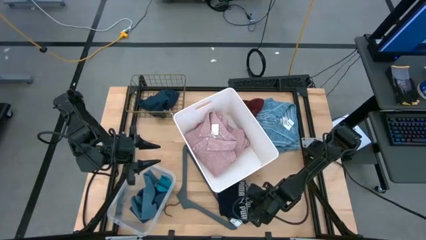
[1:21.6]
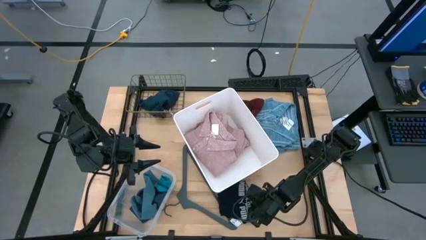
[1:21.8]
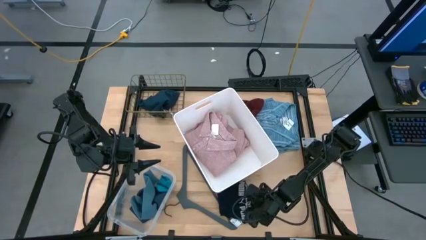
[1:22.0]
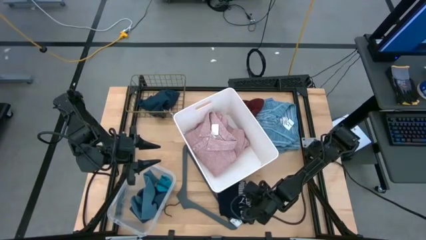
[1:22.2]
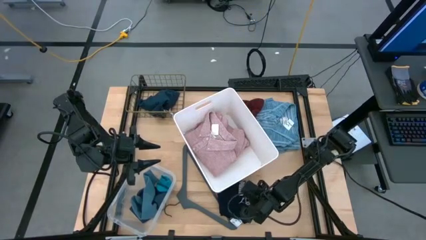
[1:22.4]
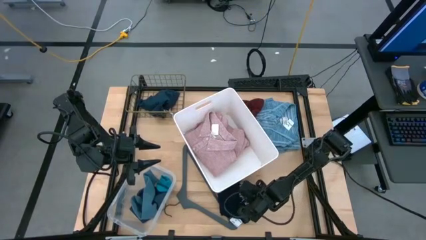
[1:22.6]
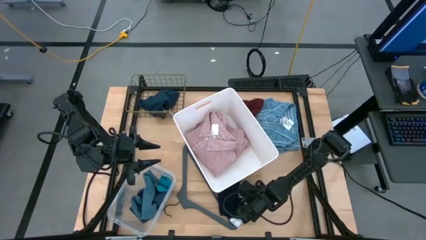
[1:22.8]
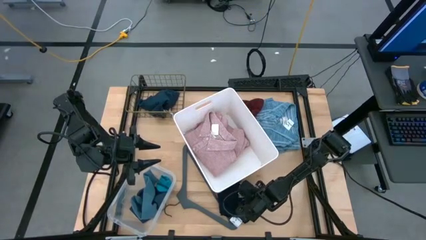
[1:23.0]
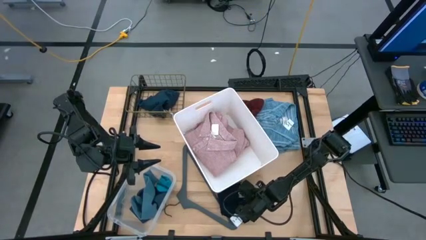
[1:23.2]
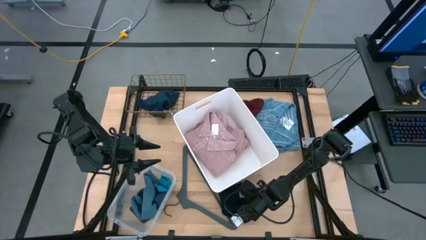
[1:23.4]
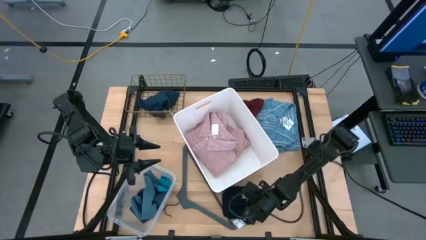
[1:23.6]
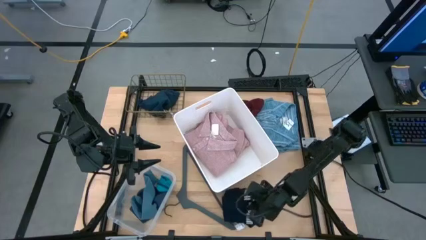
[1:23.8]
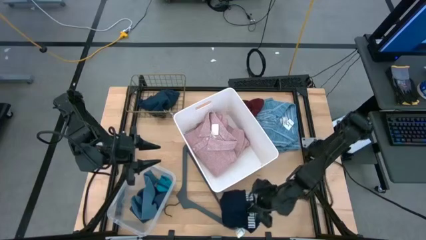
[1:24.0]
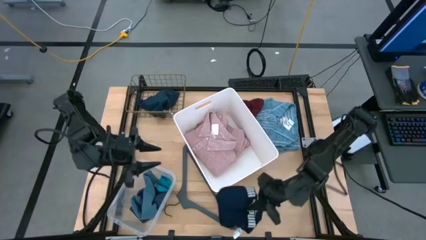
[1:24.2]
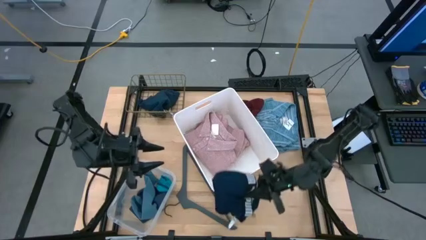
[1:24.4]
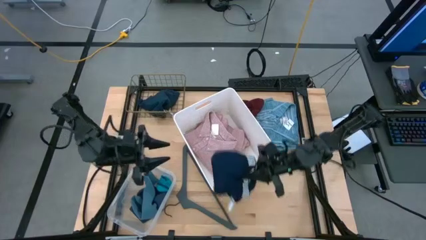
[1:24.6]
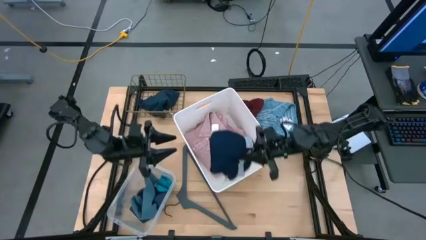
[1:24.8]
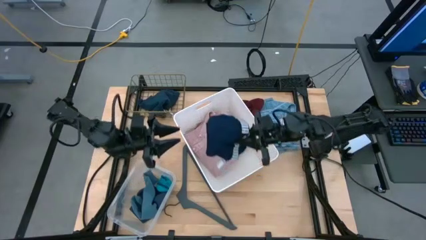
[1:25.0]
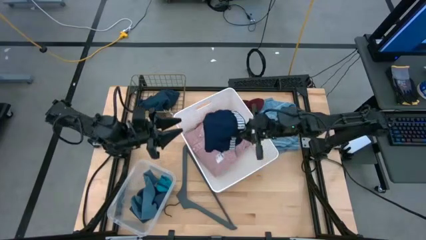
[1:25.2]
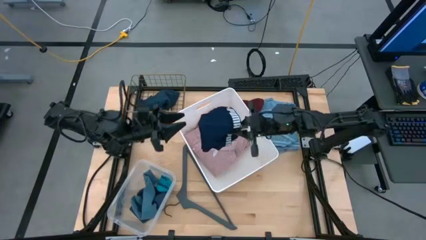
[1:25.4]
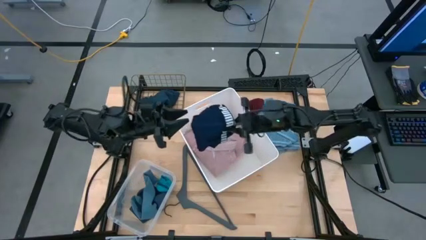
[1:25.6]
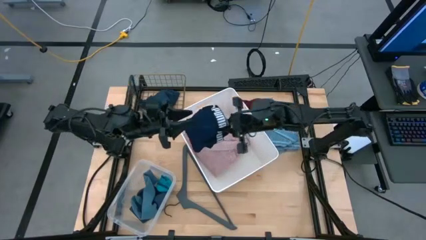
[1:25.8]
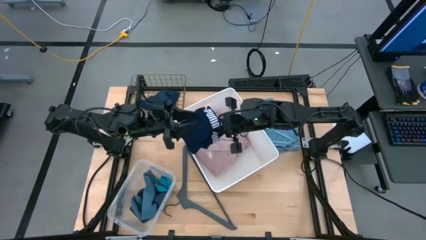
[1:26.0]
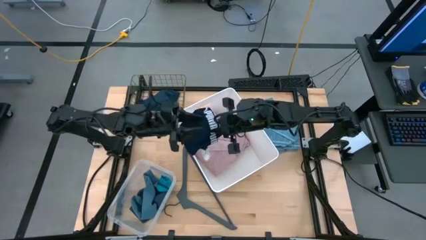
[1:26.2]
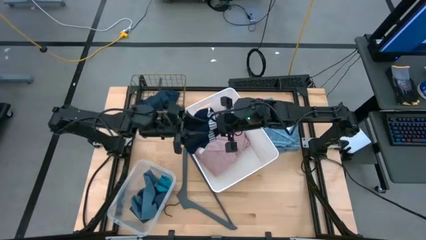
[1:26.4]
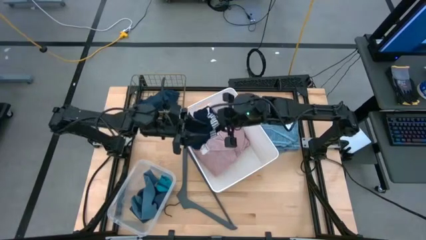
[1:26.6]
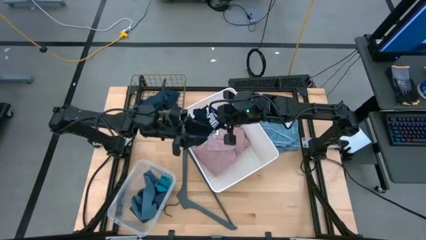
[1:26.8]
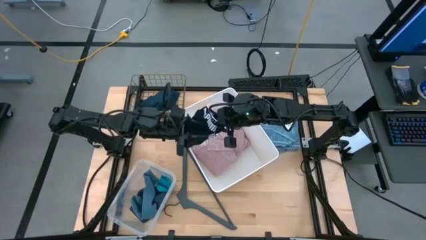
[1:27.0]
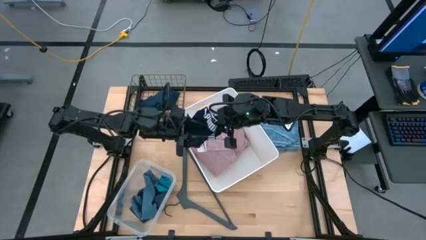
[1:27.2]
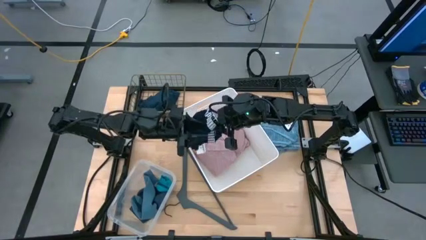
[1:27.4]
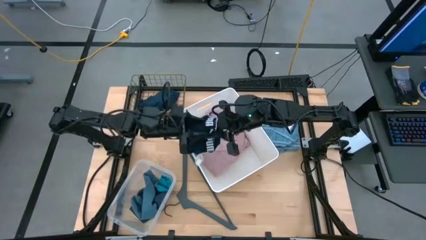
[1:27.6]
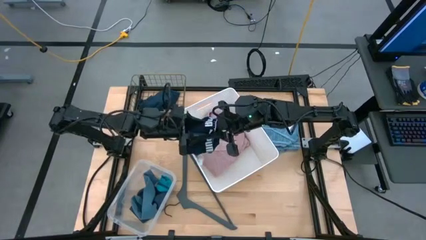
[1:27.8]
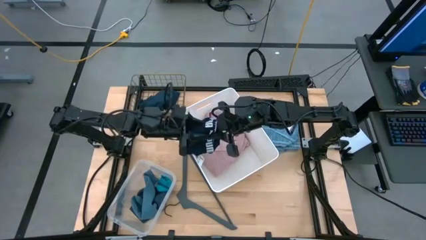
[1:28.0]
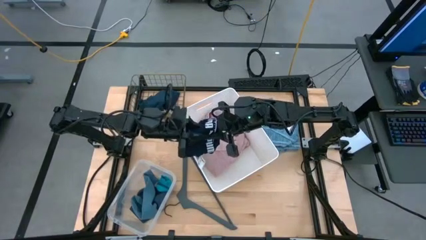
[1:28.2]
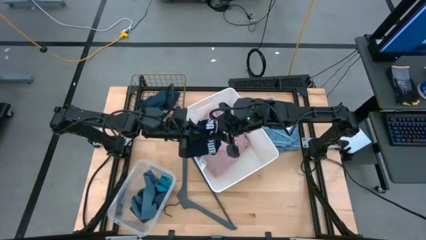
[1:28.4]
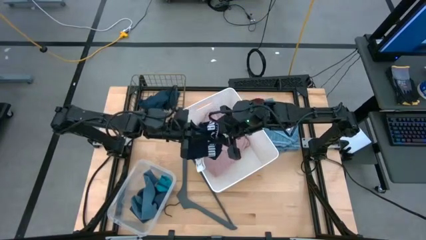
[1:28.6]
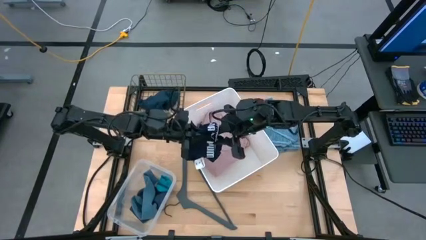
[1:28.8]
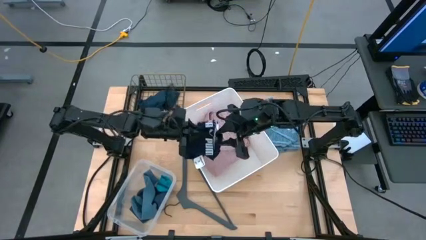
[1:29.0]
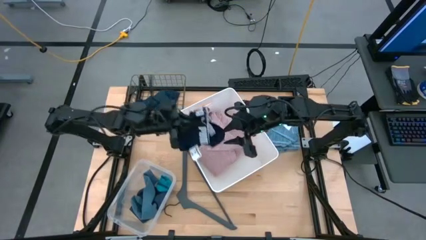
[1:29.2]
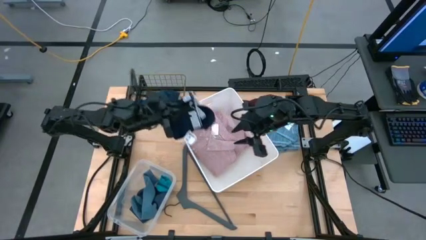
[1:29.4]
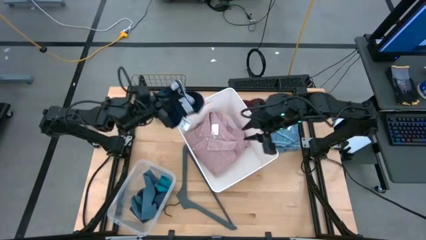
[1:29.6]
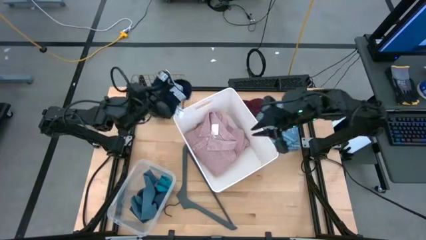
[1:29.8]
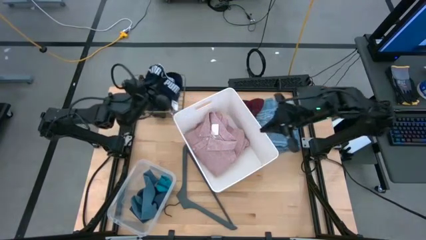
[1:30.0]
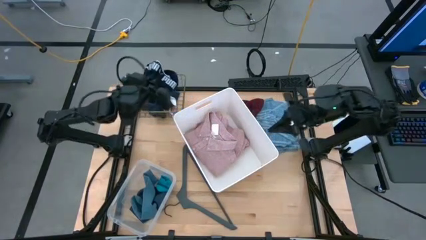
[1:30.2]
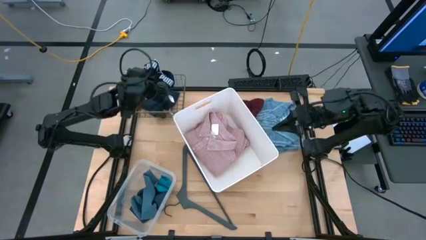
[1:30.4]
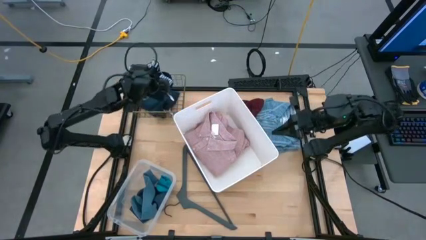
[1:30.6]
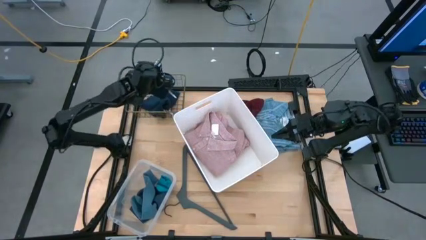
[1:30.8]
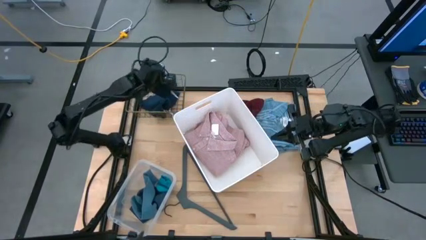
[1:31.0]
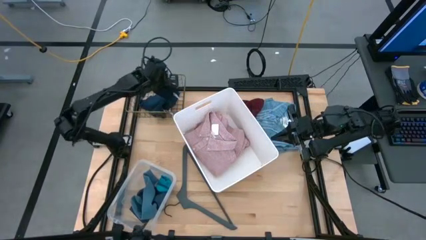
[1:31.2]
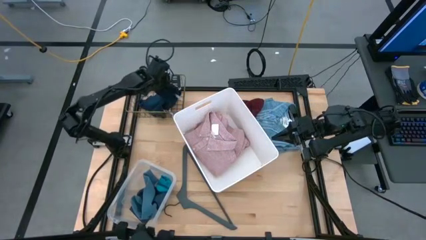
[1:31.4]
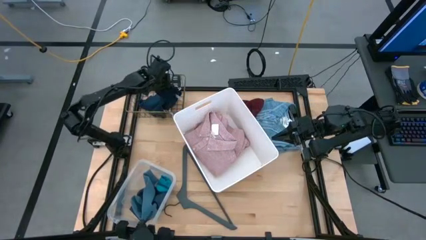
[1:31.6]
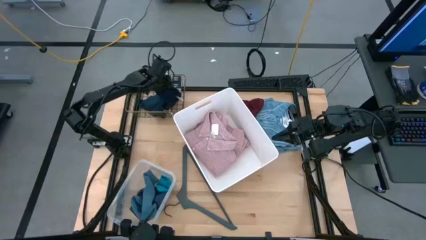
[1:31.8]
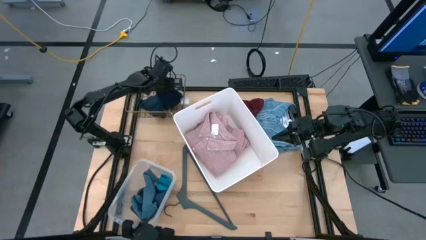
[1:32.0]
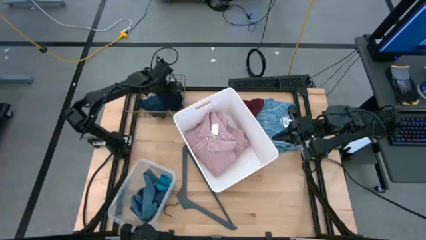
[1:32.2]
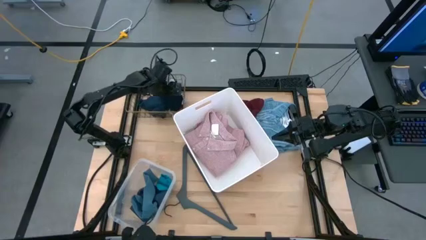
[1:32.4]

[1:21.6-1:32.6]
Task: Pick & Place Cloths
Put the blue briefs into the wire basket
